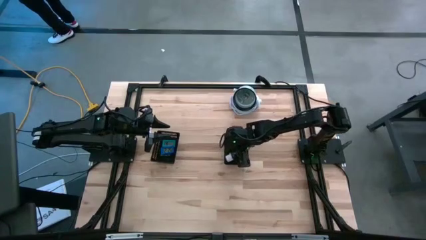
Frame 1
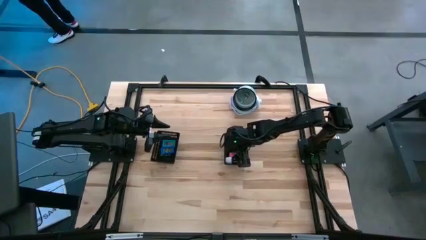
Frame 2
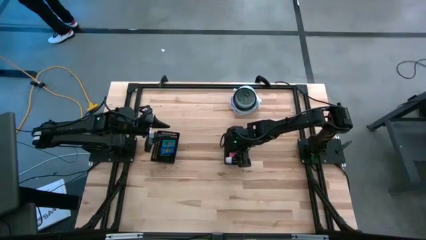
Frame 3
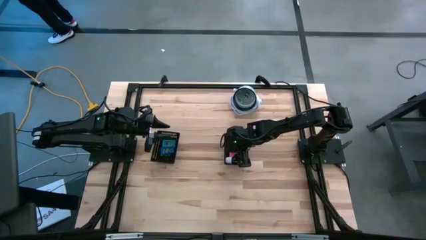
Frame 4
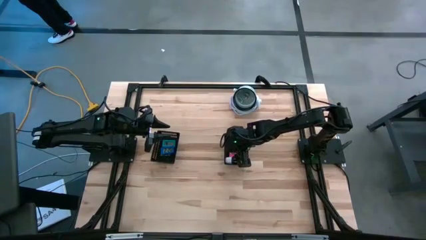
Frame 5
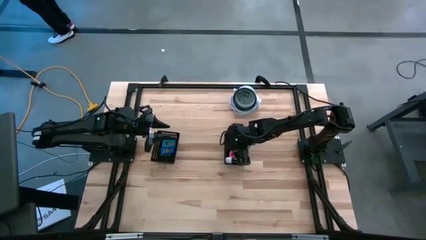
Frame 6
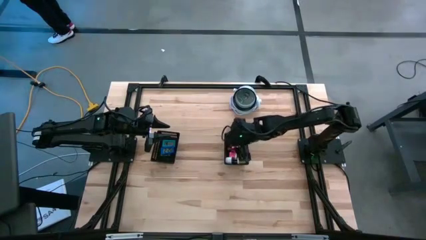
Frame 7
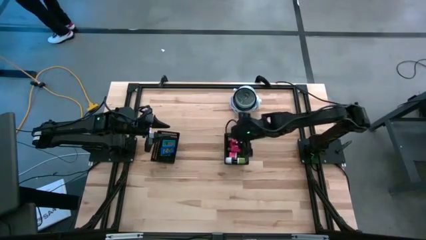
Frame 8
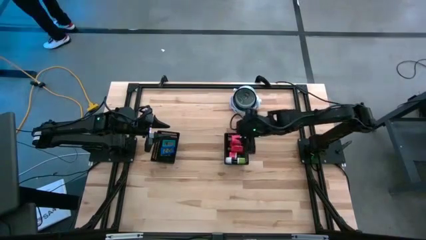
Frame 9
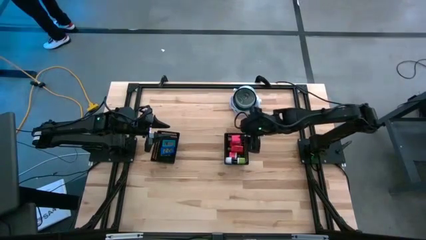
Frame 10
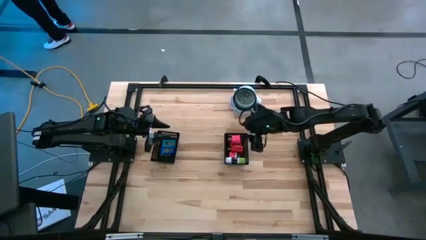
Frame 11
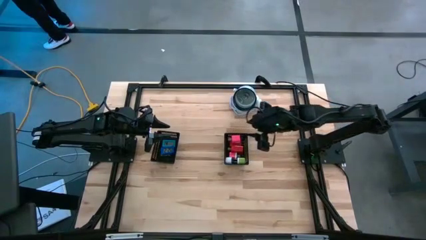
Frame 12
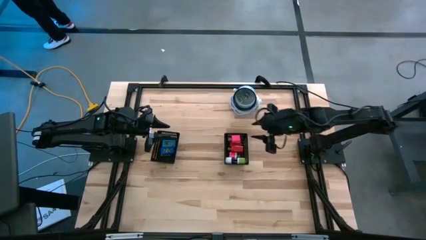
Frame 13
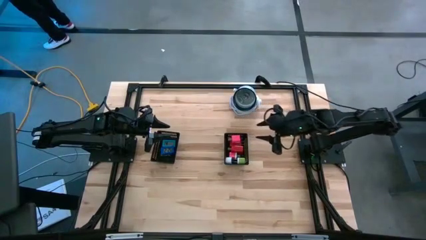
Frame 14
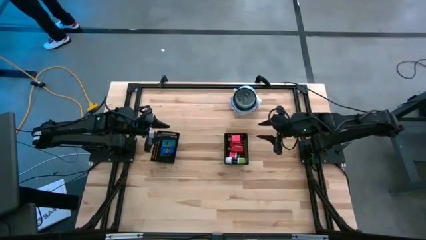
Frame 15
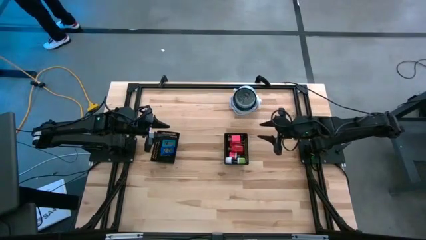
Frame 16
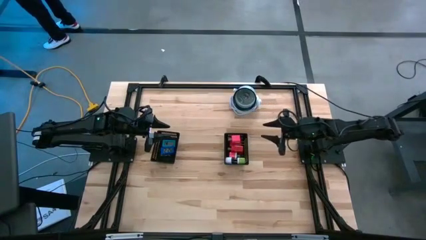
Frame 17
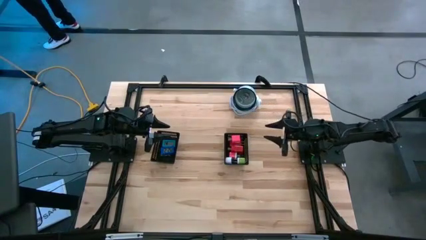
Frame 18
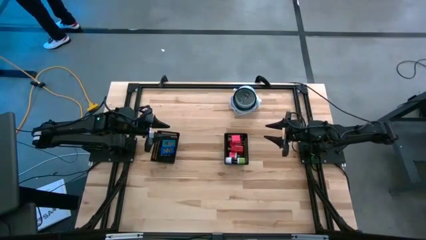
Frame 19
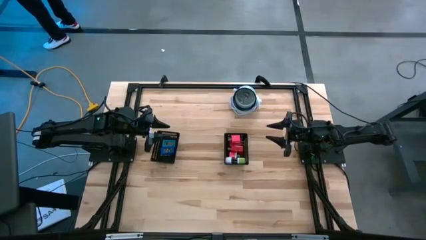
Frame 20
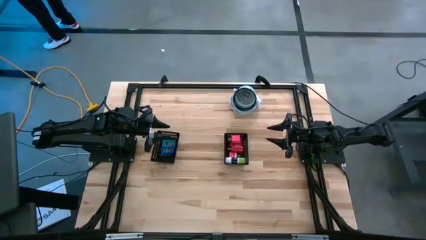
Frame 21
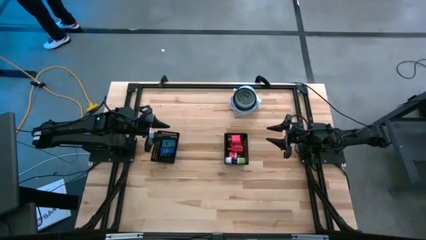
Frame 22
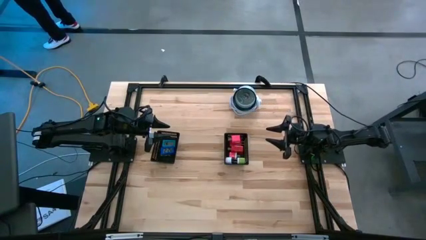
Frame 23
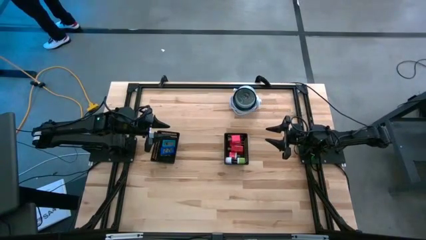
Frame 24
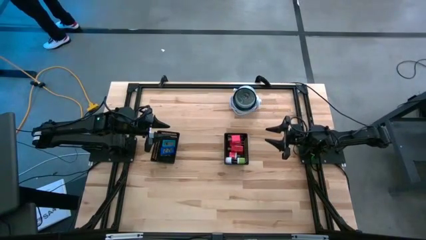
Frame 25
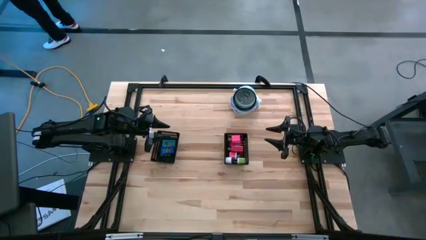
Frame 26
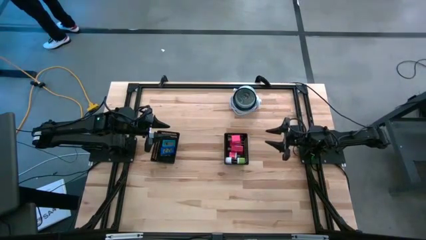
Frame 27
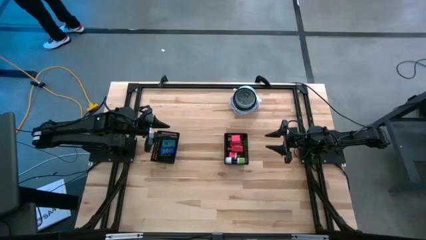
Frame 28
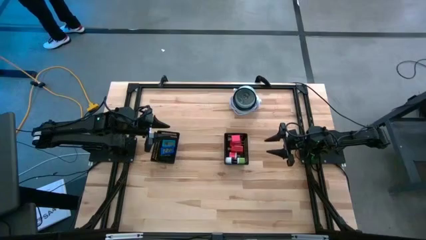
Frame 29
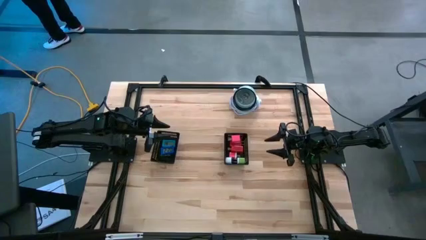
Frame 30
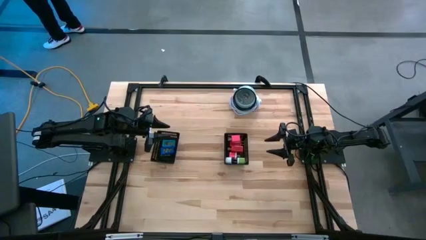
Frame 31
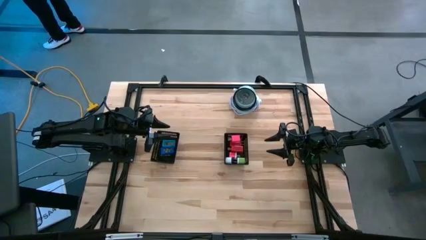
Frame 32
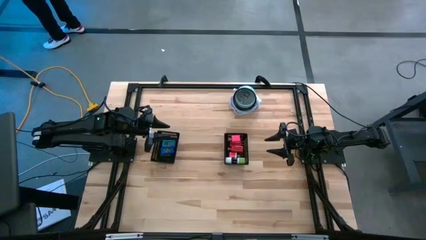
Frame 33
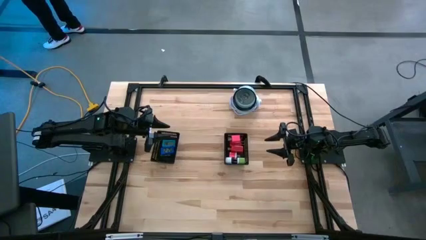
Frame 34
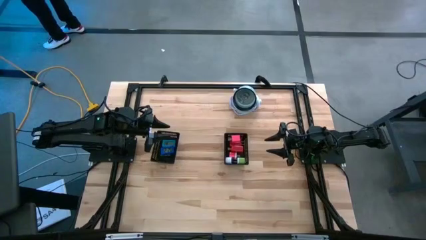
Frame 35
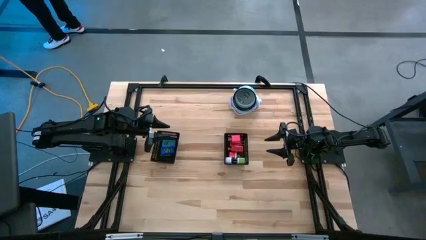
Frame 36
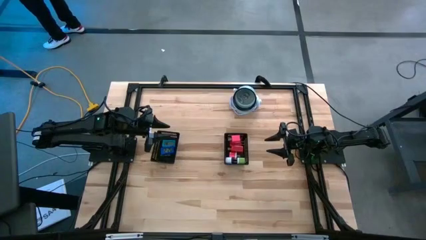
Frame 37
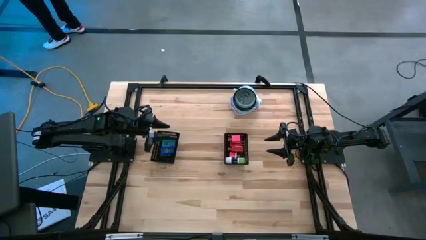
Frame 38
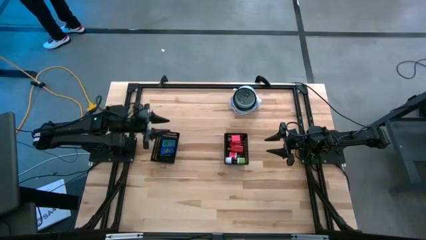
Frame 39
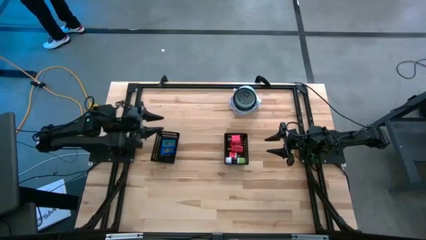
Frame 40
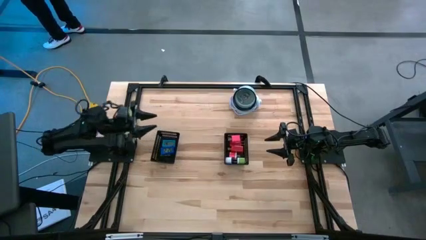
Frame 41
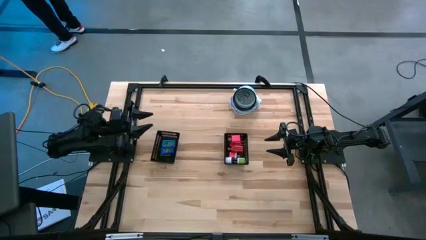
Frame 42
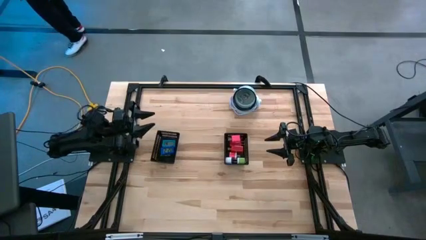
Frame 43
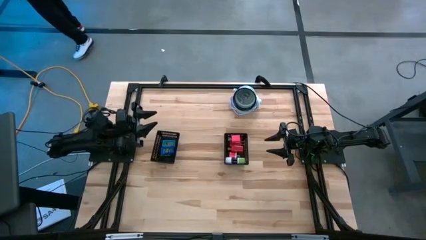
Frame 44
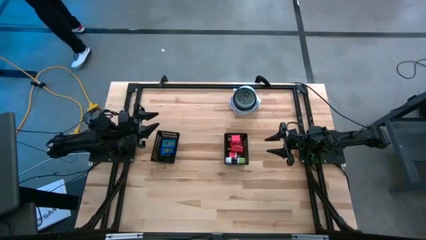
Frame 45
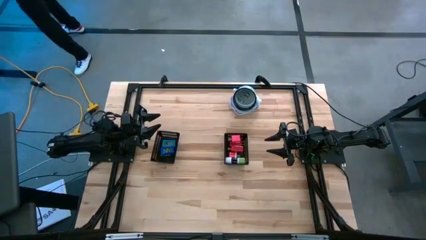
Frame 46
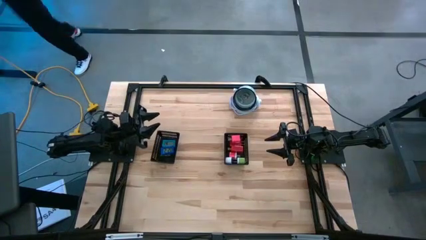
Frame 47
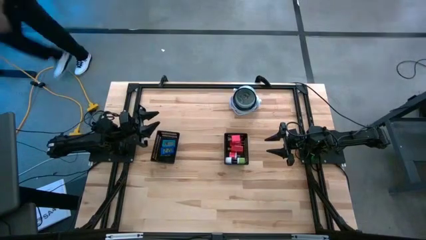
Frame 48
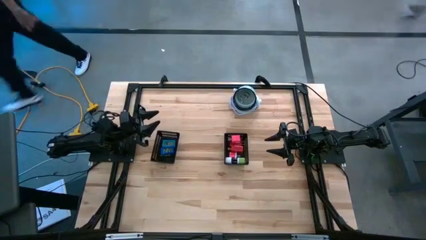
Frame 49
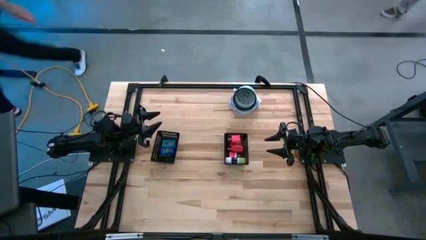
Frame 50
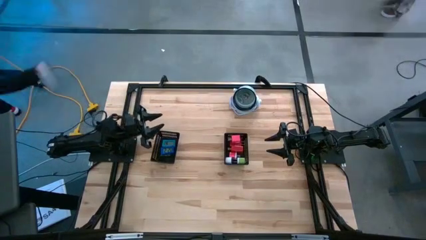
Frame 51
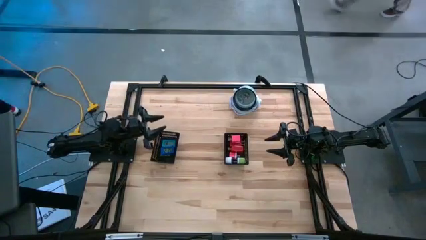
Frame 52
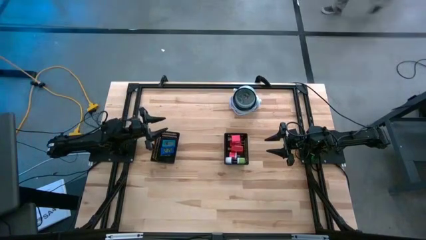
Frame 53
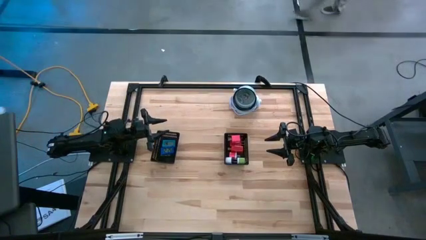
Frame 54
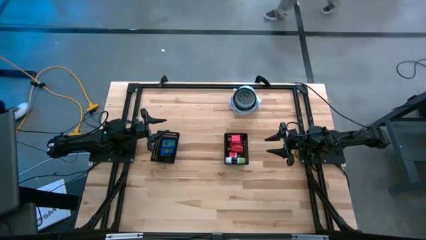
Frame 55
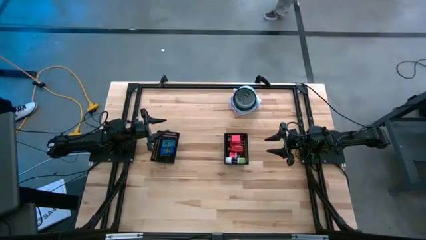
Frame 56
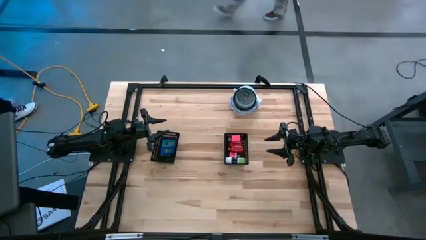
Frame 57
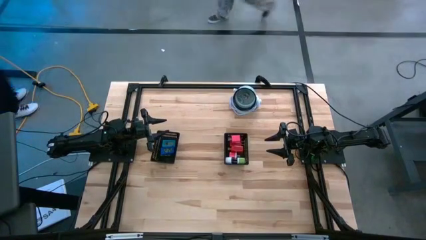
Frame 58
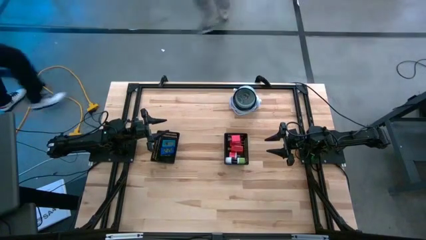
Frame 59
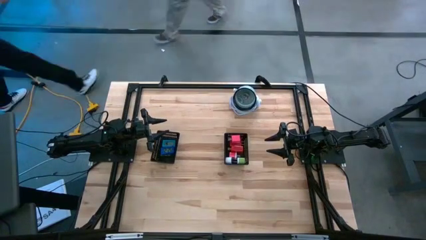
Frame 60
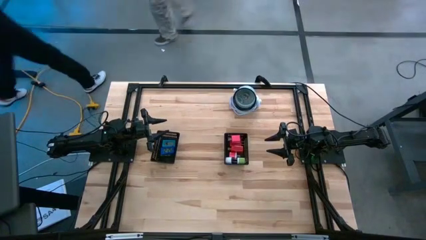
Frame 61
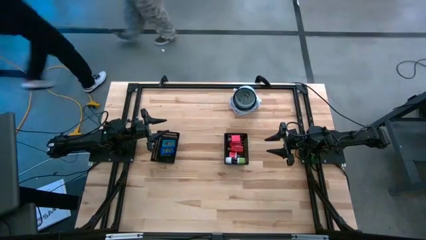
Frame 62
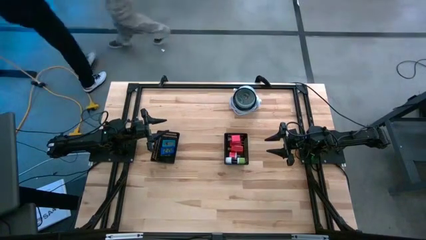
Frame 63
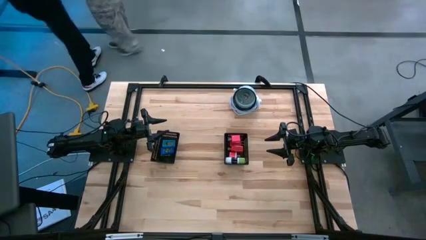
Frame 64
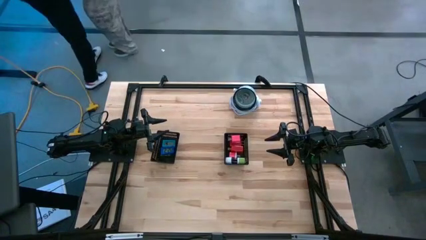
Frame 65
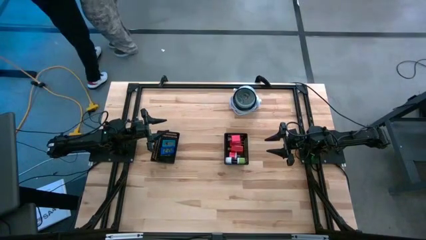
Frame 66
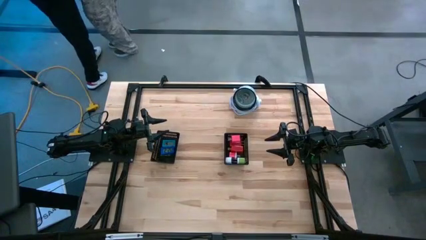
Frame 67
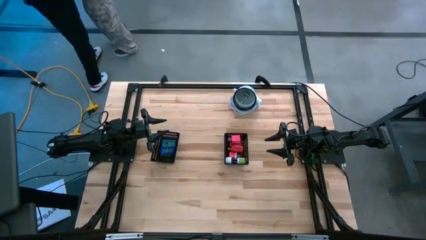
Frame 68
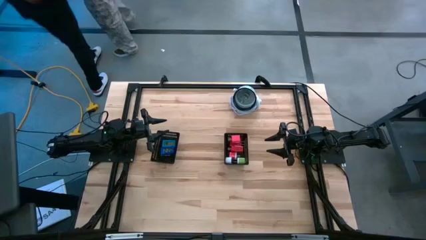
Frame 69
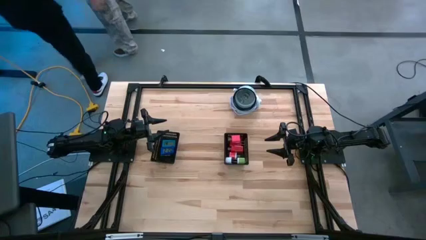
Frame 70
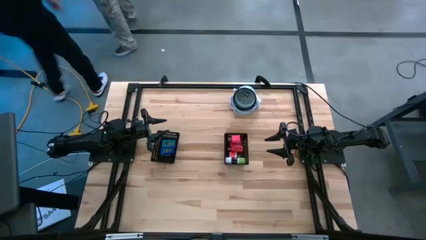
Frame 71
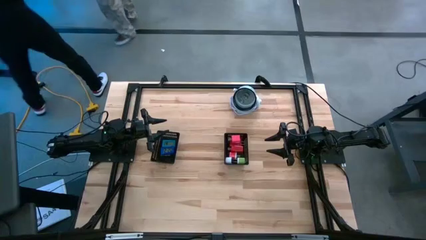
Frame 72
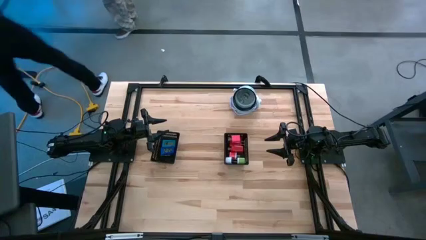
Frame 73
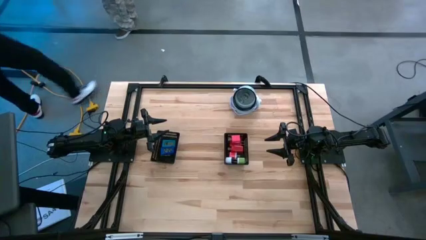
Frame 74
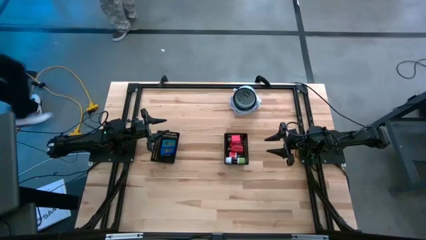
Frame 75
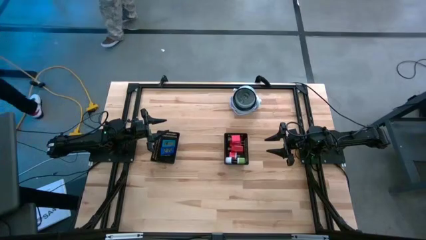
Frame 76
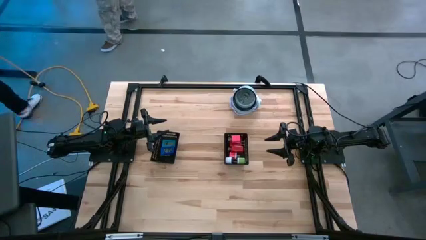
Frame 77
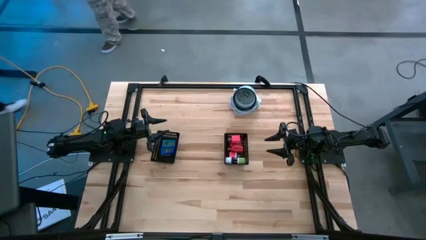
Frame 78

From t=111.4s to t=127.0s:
Task: Pick & Place Office items
Return to Home Position

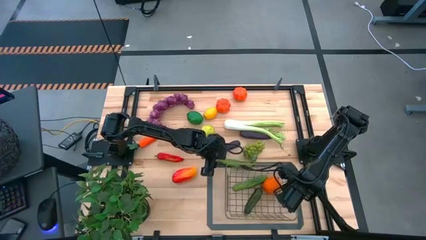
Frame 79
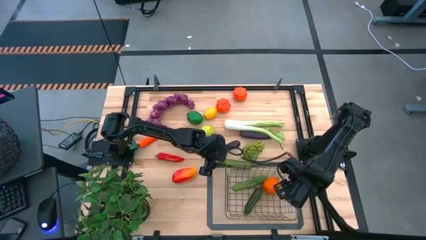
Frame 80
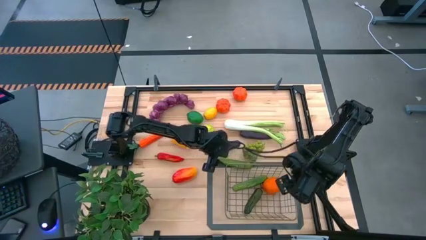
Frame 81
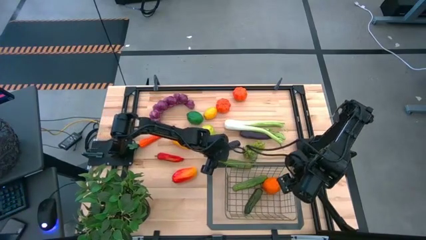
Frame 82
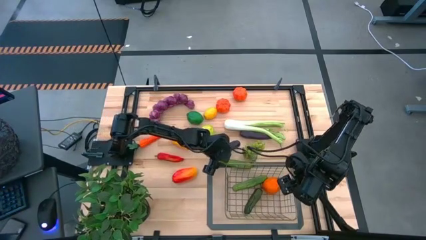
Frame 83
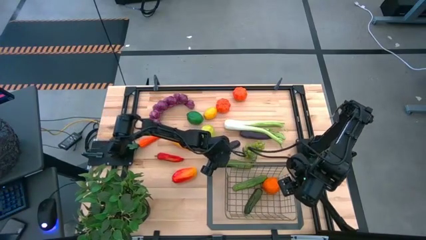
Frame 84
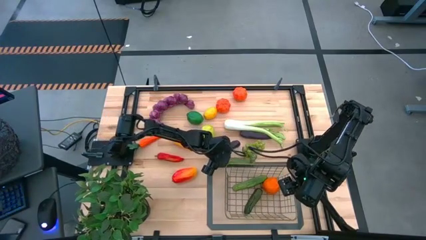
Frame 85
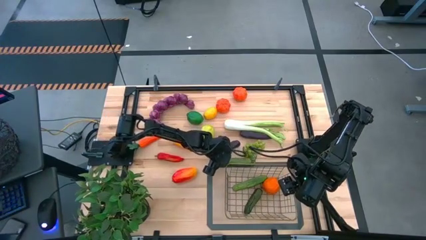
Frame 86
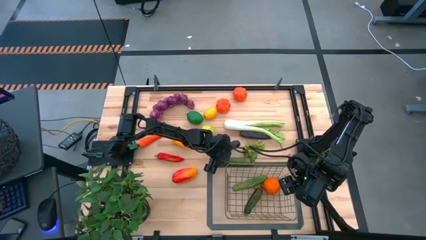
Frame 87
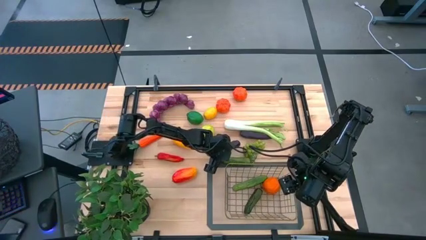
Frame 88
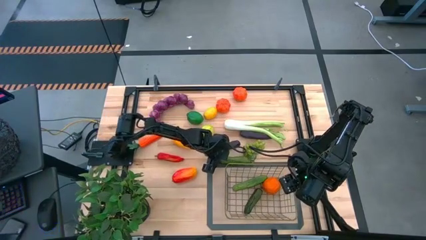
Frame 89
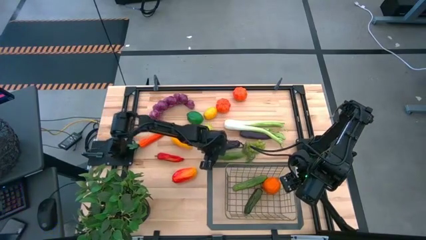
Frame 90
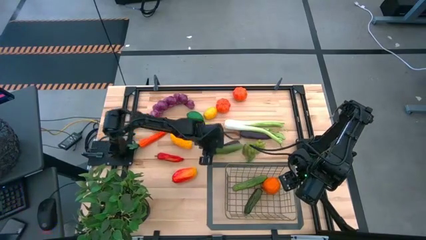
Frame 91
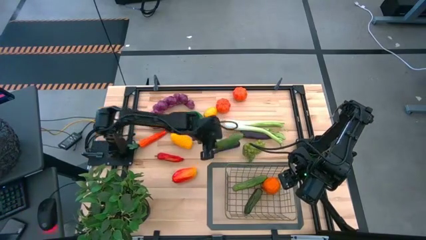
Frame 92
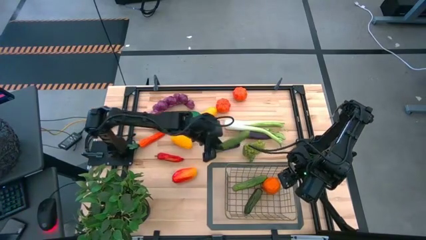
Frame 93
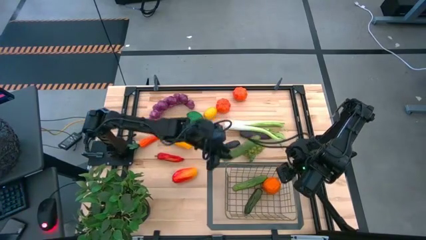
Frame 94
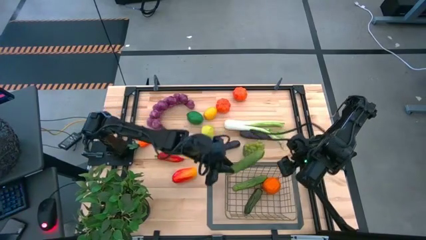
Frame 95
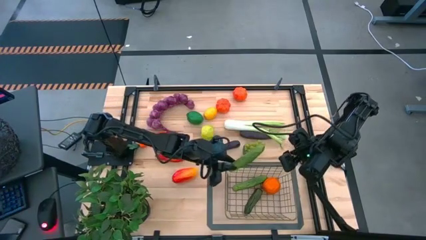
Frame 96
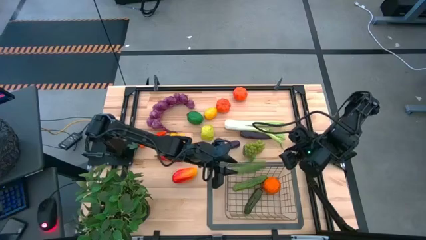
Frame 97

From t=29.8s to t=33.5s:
Task: Build produce basket
Put the cucumber into the wire basket
